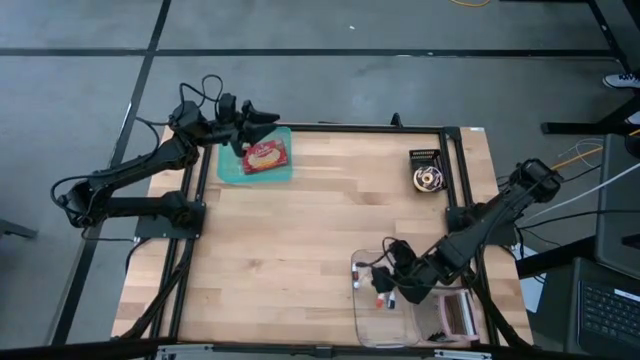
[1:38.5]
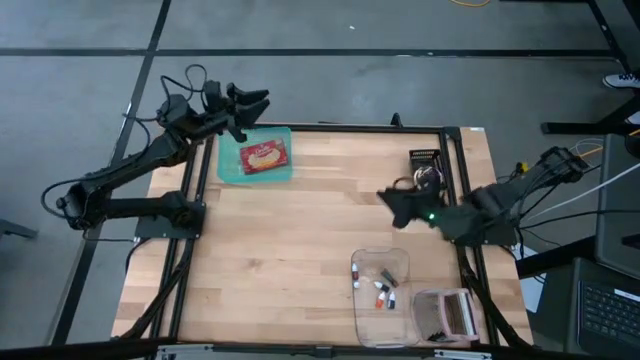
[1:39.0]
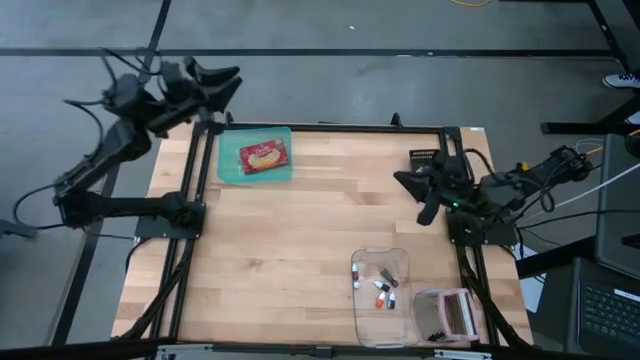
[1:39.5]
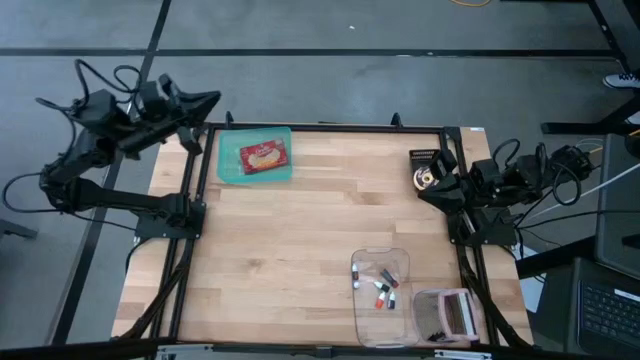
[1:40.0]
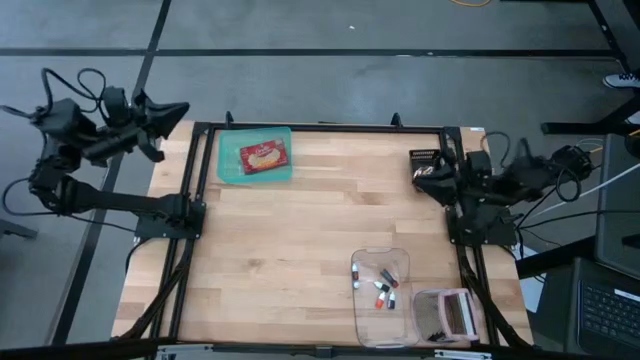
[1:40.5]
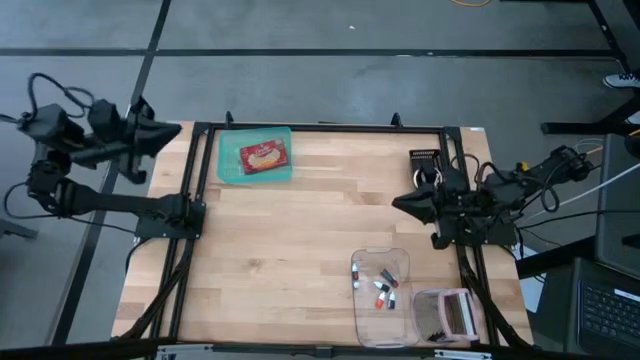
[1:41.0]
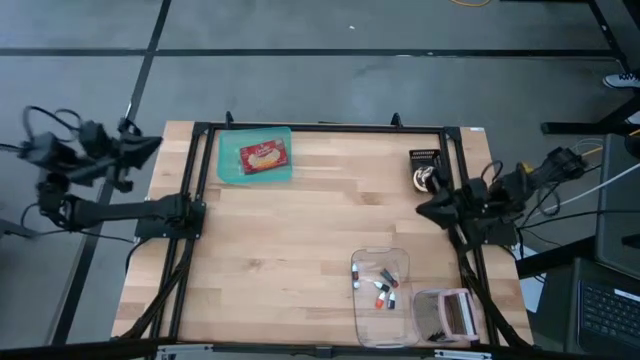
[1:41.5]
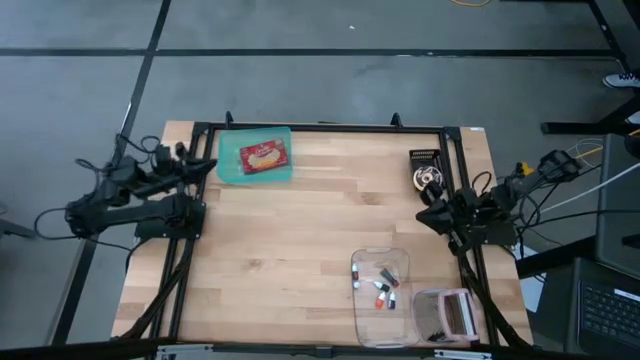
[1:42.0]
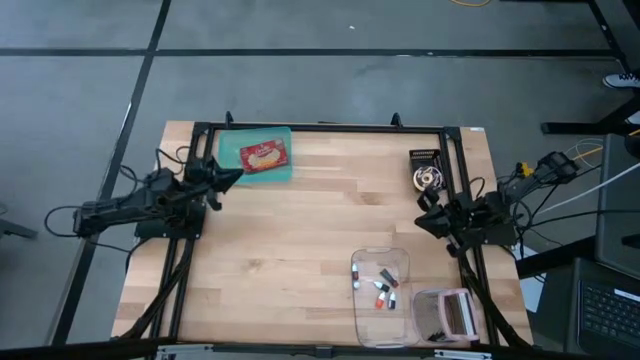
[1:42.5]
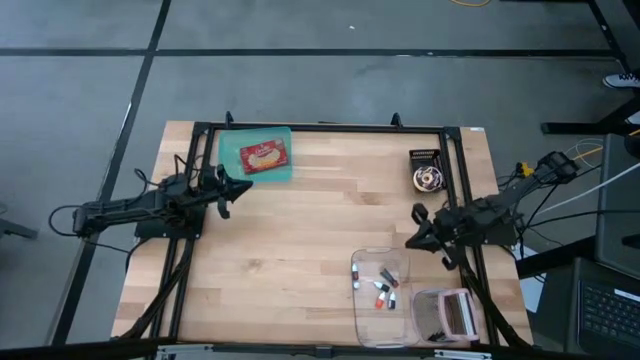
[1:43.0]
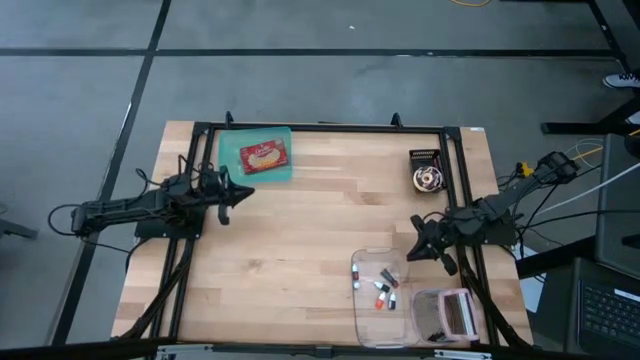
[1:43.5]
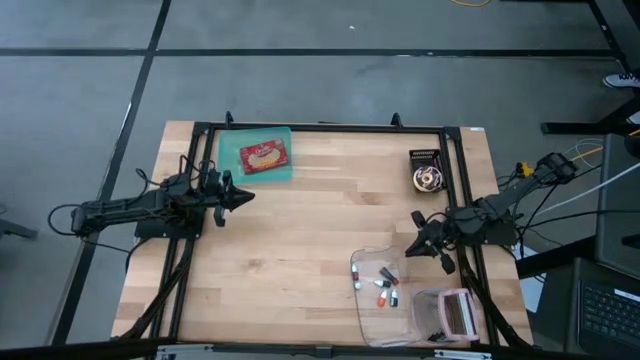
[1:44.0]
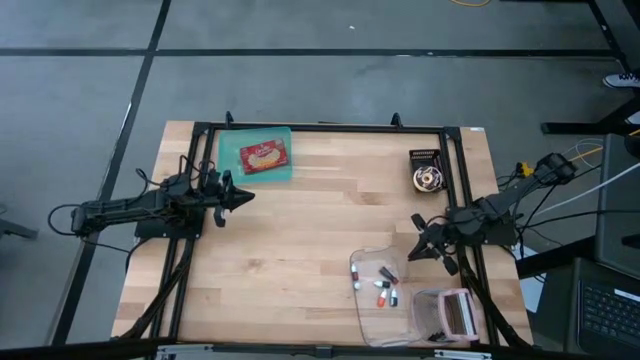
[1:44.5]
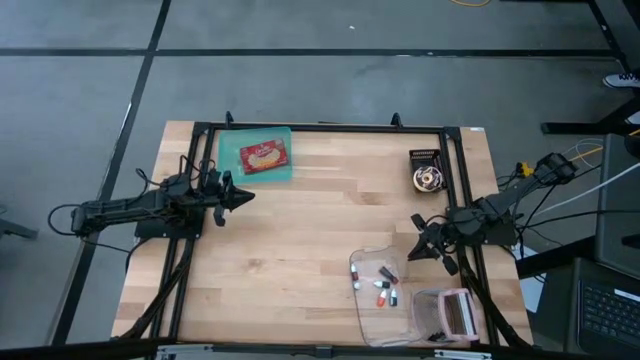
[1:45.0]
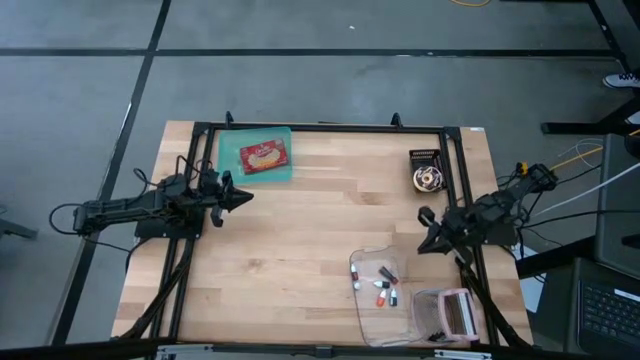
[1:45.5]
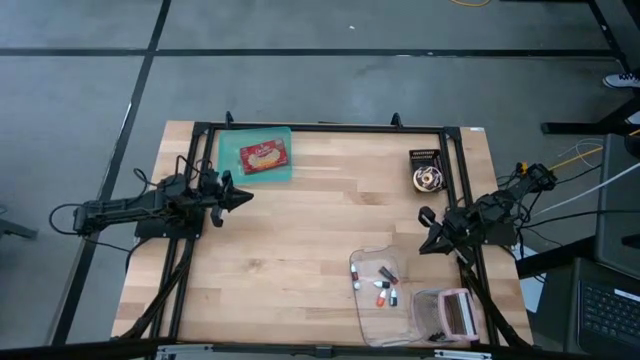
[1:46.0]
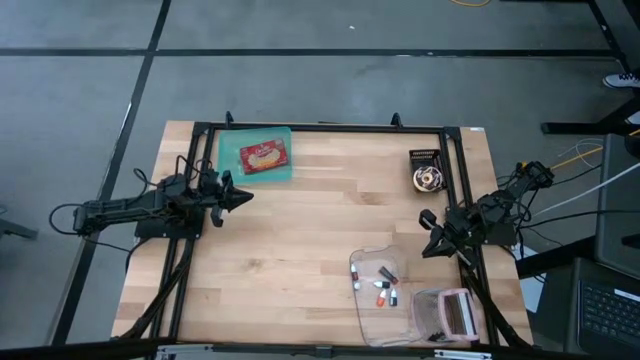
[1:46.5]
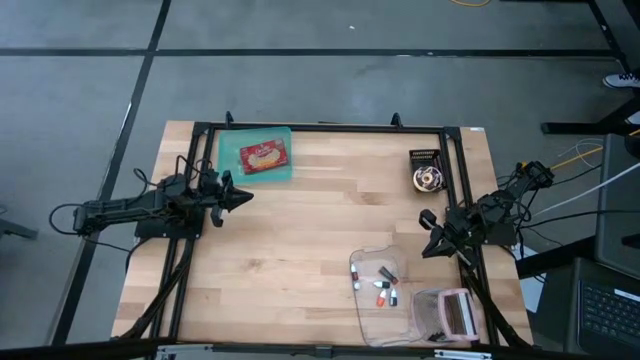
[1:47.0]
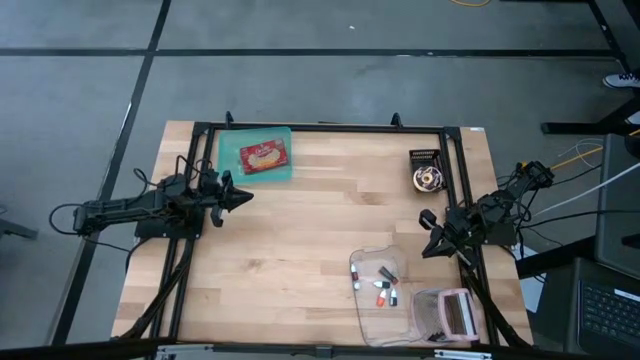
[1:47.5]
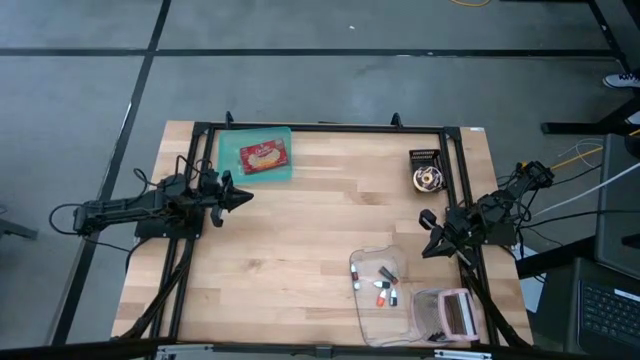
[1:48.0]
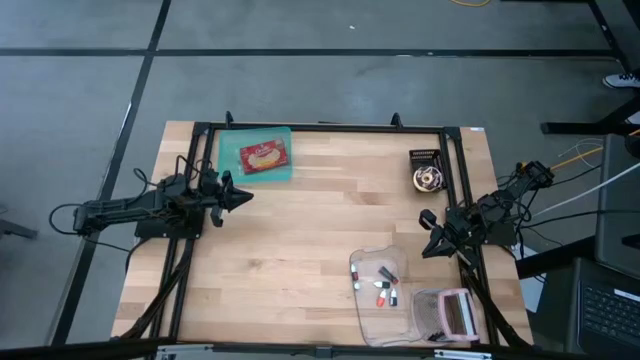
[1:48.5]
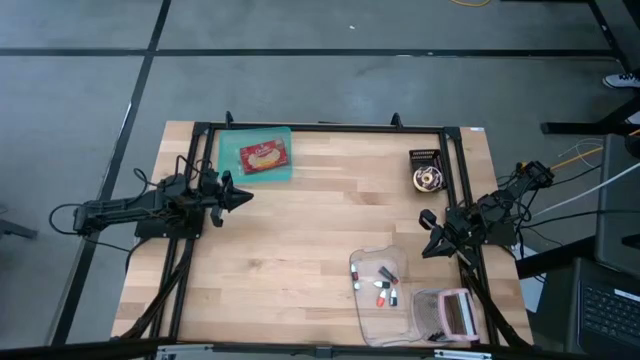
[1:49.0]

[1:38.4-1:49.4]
Return to Home Position
